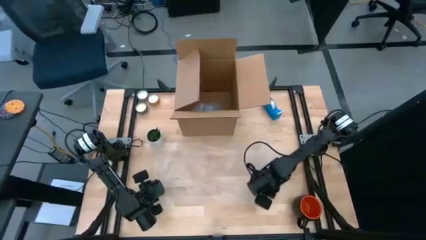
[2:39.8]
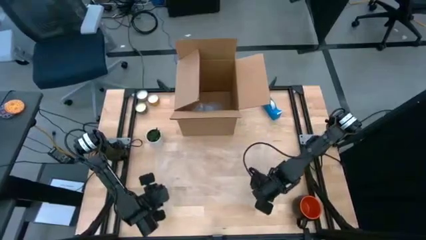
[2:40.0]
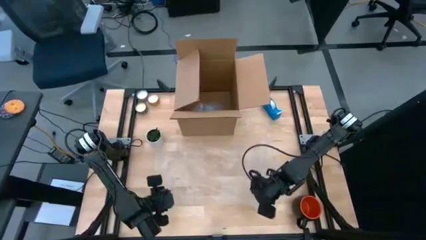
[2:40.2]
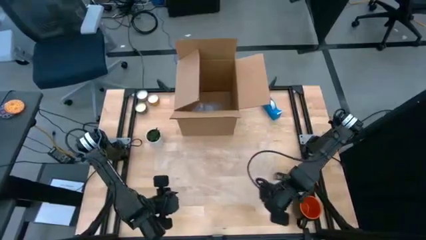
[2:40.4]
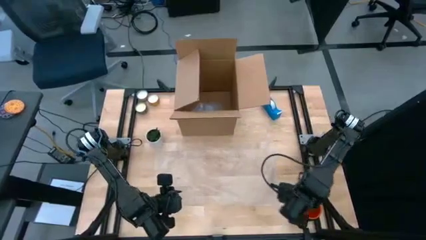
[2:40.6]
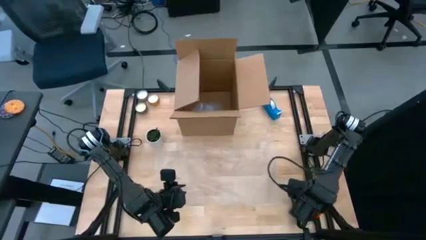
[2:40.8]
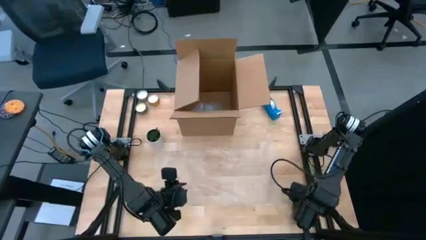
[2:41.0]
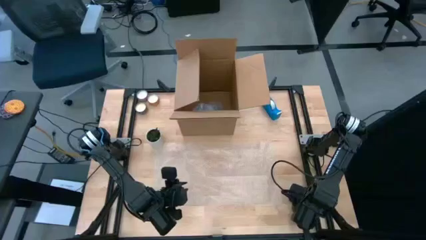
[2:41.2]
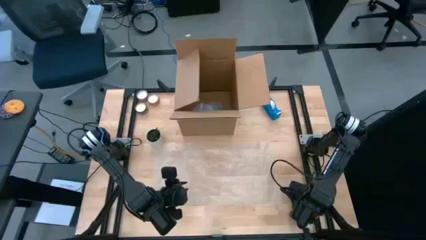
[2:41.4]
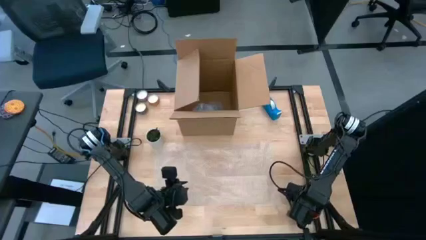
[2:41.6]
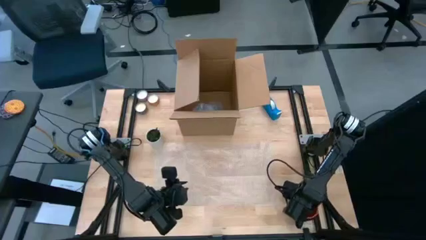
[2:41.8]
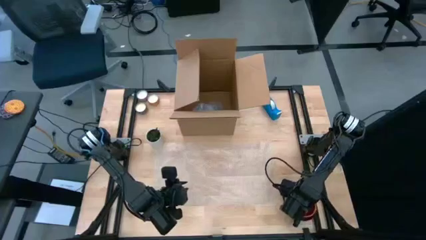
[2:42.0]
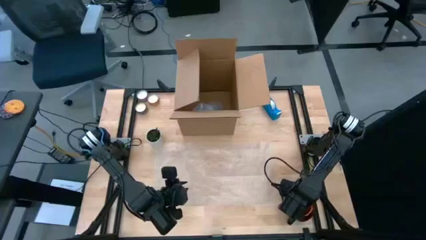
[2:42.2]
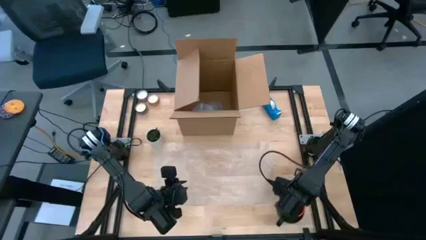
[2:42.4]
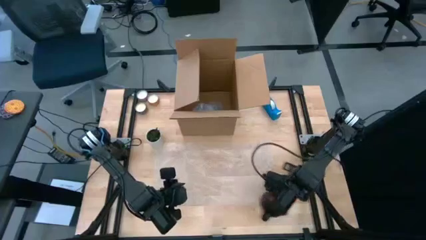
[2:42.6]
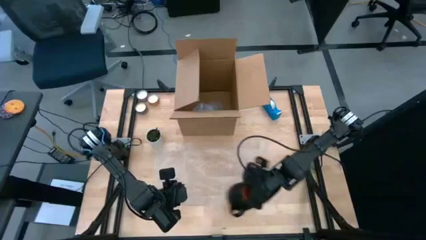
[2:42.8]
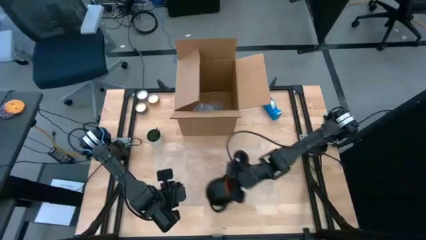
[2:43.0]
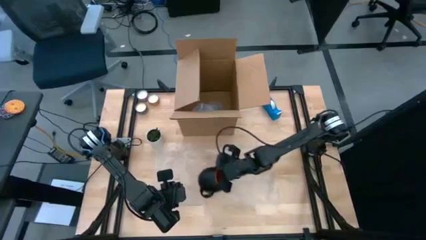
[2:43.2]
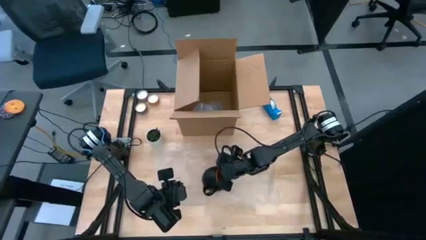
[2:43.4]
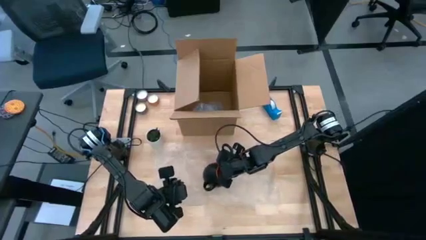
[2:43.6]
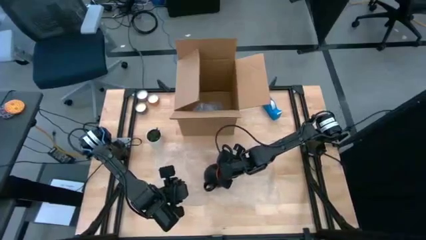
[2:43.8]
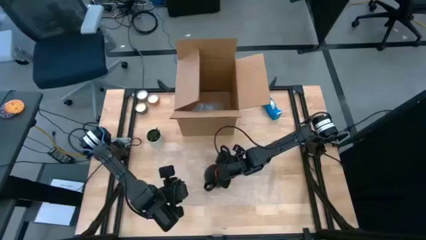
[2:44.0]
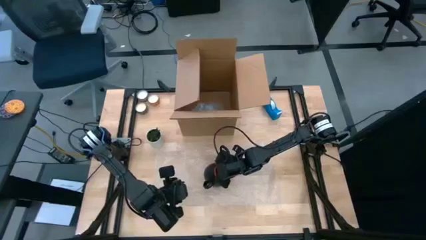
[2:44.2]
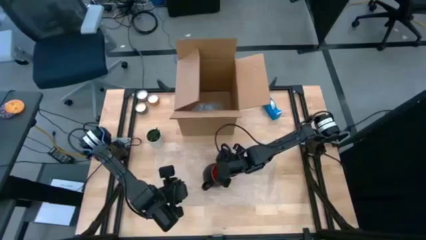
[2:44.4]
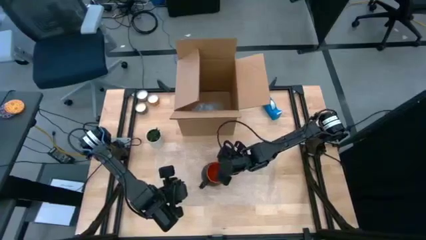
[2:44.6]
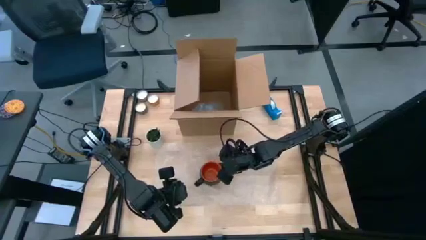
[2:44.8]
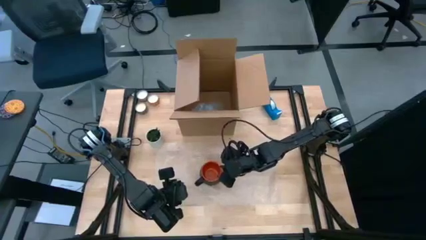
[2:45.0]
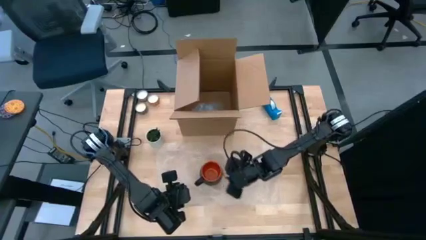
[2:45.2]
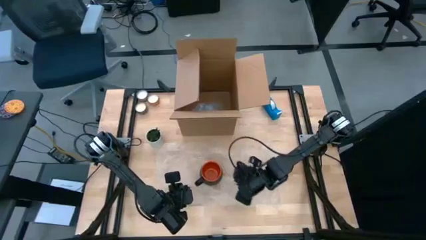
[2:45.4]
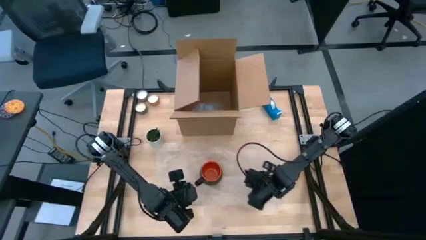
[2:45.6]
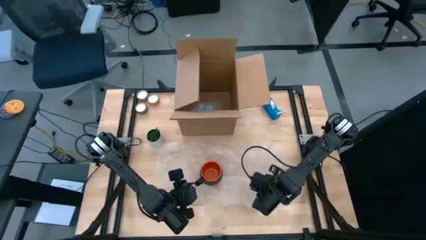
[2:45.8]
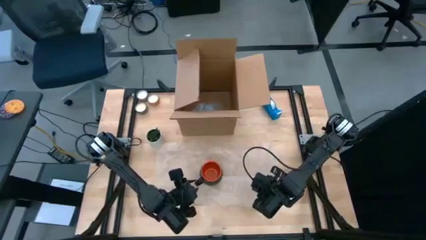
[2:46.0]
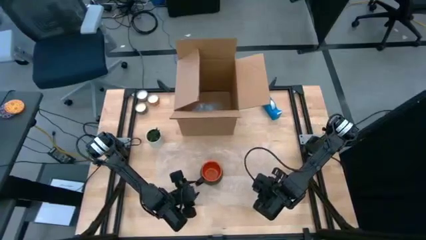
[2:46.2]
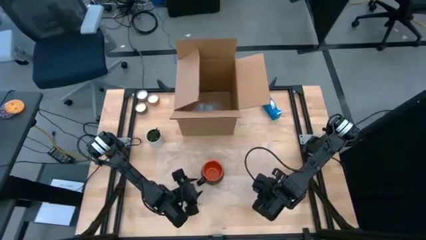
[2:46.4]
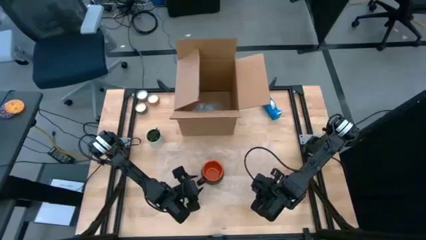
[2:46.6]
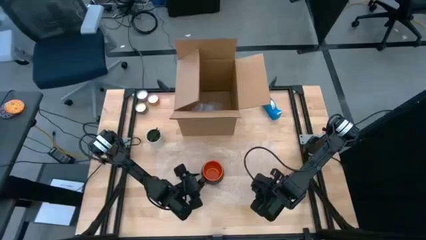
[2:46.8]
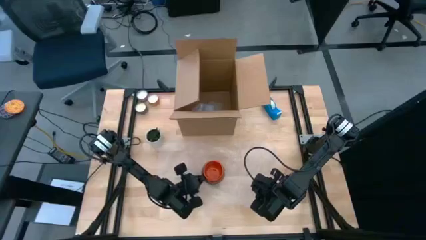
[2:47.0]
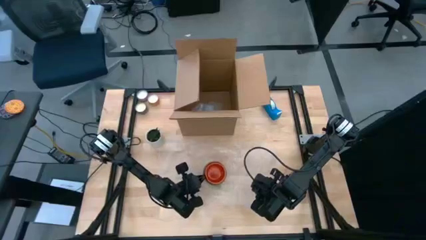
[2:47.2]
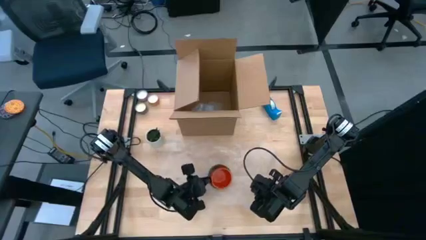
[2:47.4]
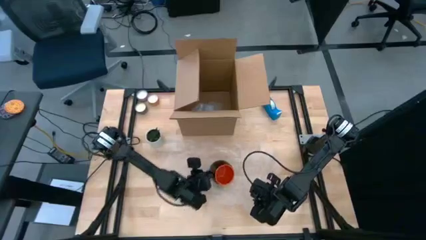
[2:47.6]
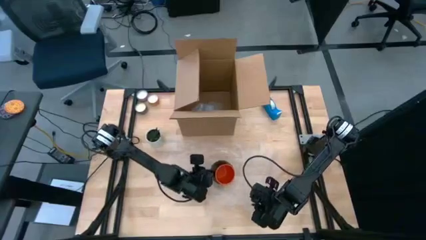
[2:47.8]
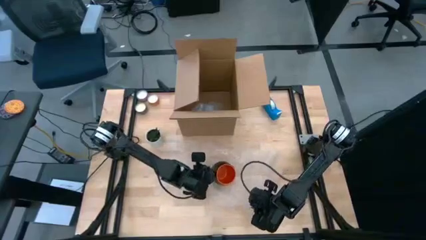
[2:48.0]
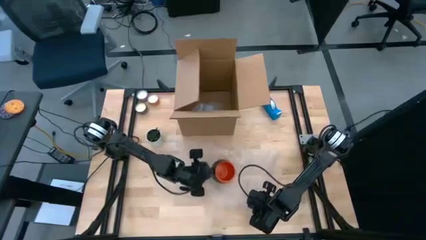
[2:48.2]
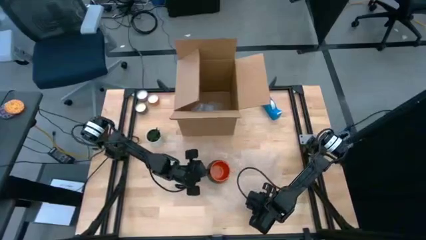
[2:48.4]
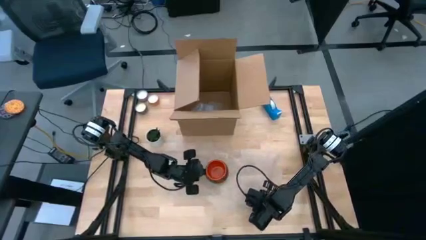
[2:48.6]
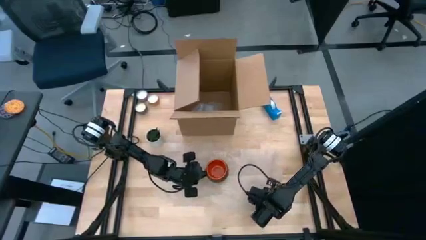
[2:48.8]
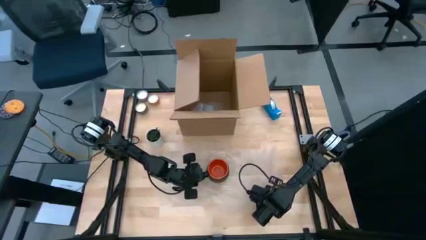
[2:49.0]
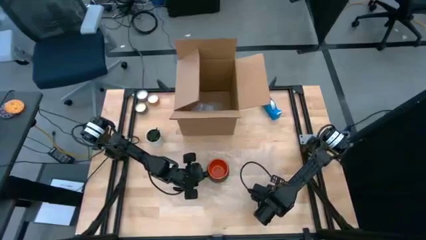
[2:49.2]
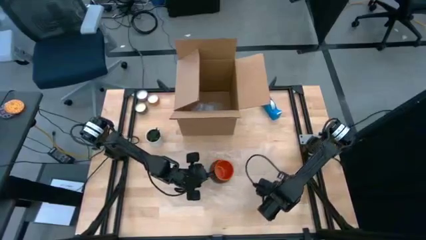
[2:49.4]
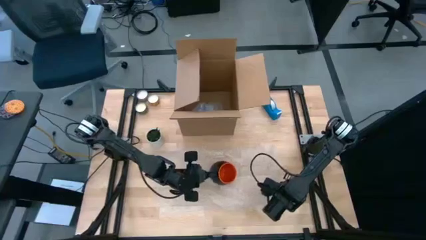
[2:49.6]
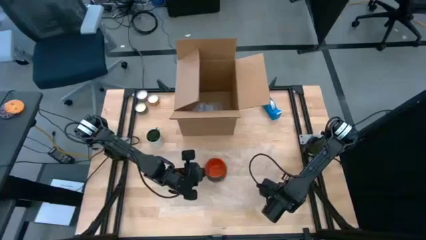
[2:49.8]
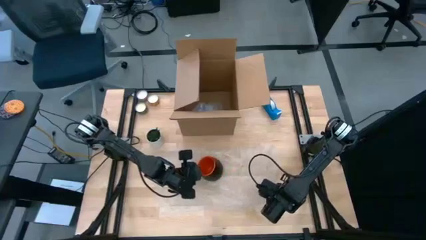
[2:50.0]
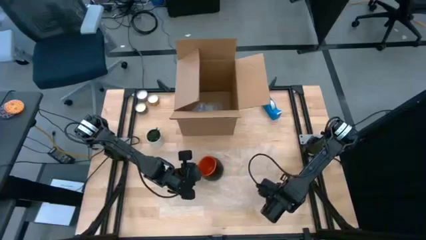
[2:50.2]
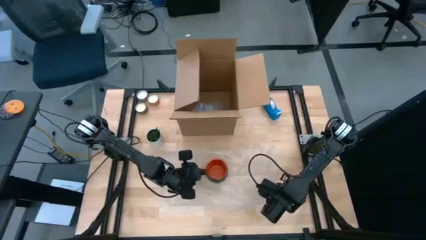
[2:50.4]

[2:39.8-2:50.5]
Task: wrap mug
Put the black cup on the transparent bubble wrap

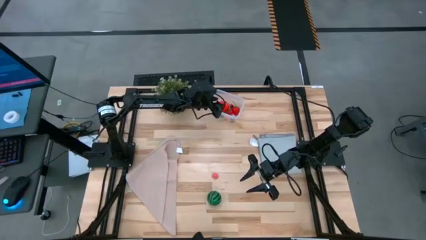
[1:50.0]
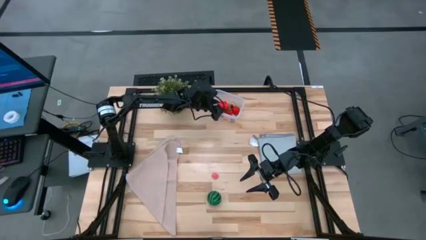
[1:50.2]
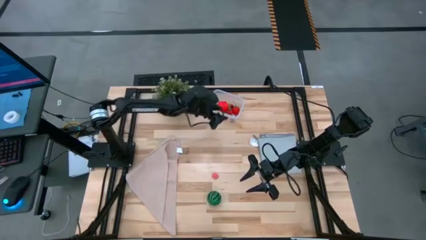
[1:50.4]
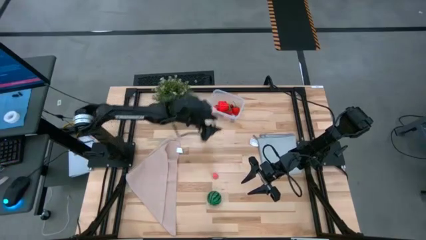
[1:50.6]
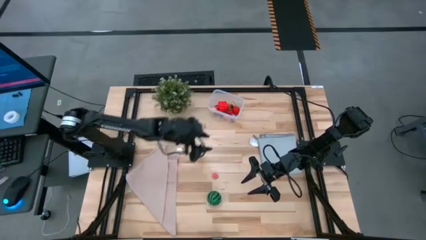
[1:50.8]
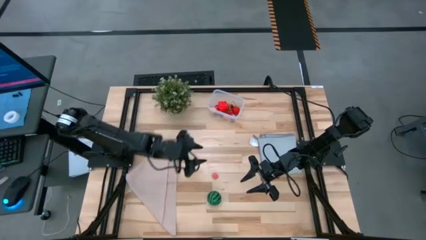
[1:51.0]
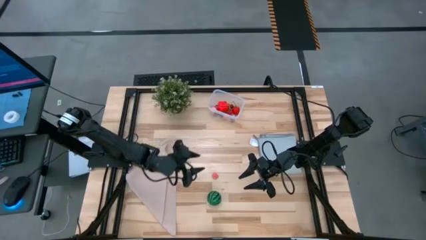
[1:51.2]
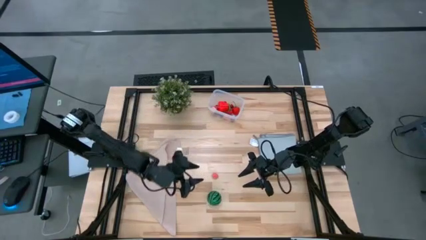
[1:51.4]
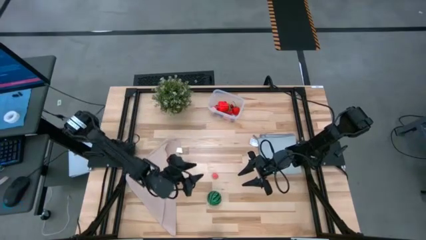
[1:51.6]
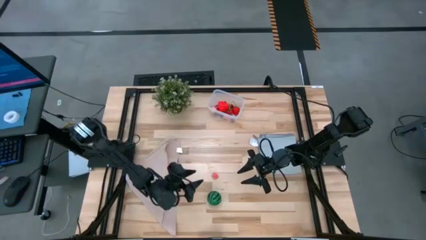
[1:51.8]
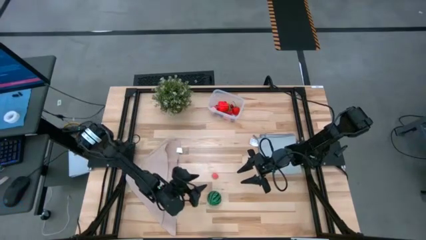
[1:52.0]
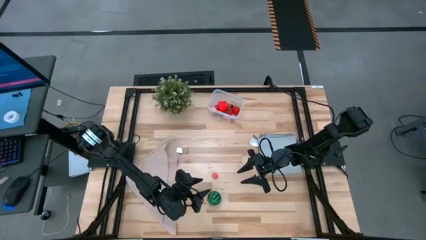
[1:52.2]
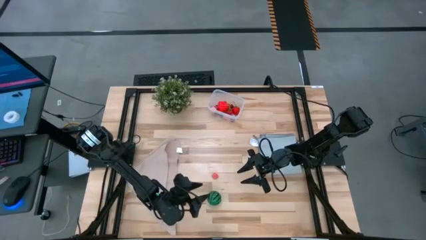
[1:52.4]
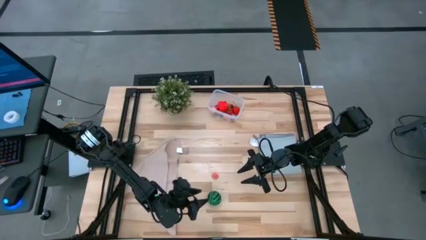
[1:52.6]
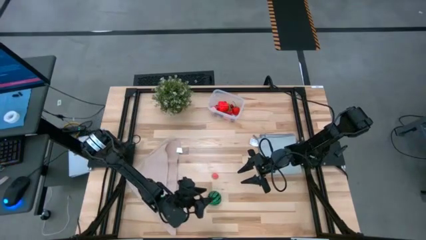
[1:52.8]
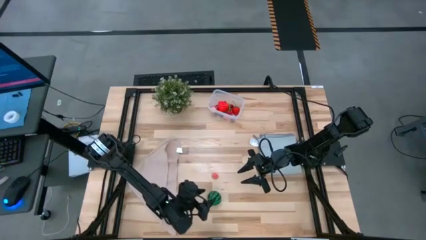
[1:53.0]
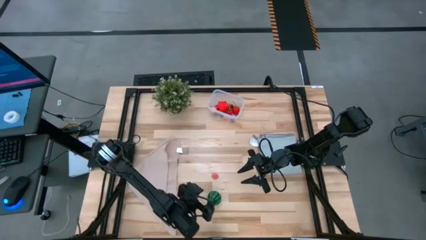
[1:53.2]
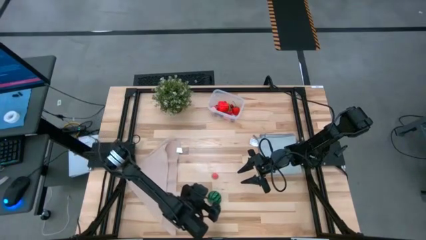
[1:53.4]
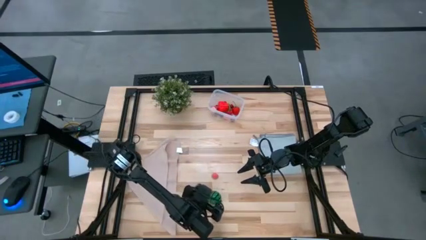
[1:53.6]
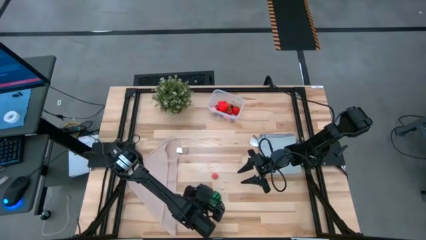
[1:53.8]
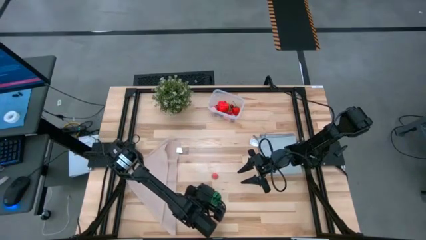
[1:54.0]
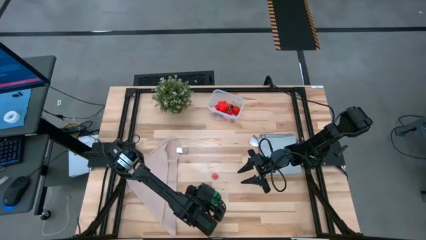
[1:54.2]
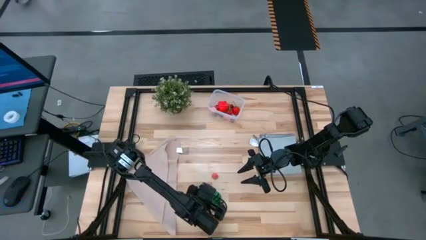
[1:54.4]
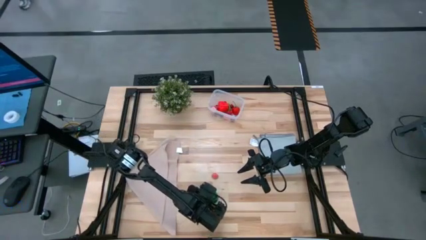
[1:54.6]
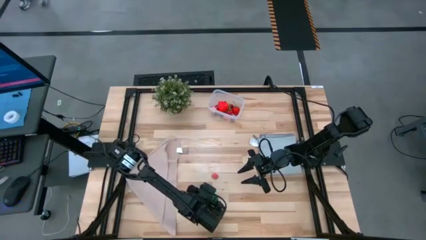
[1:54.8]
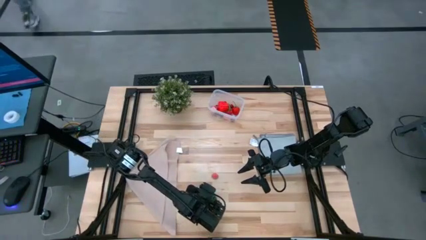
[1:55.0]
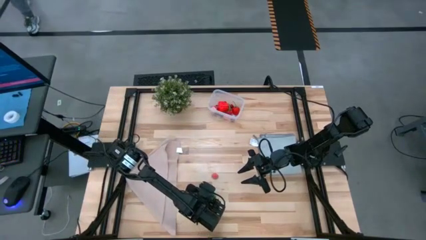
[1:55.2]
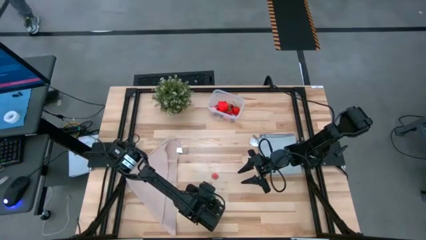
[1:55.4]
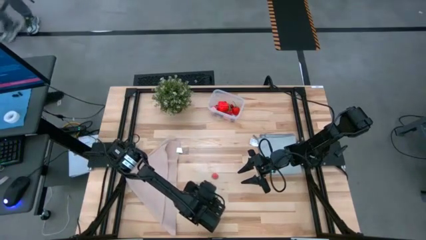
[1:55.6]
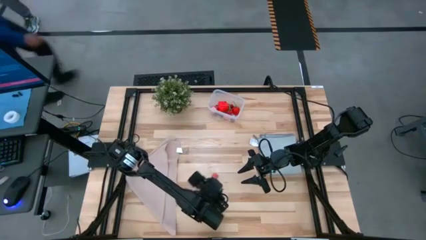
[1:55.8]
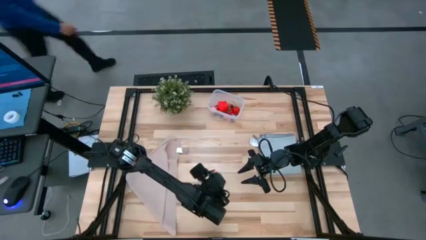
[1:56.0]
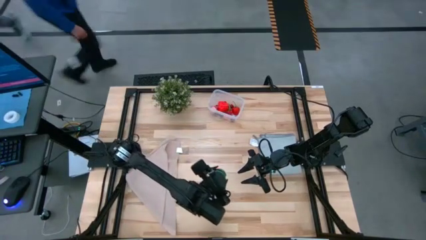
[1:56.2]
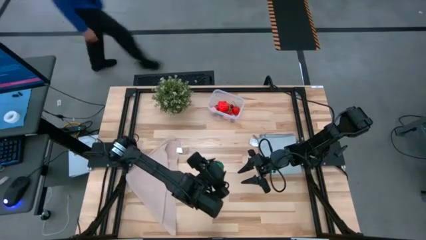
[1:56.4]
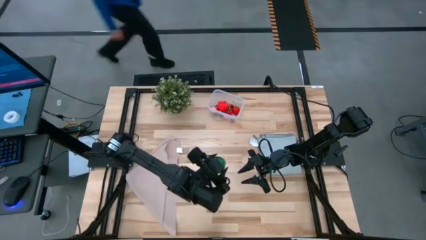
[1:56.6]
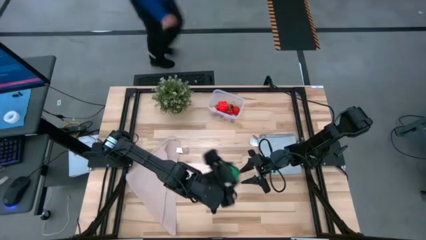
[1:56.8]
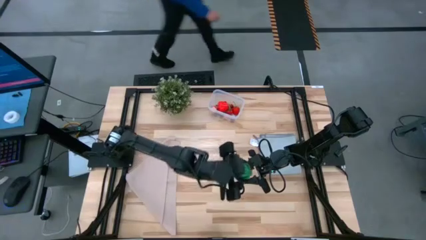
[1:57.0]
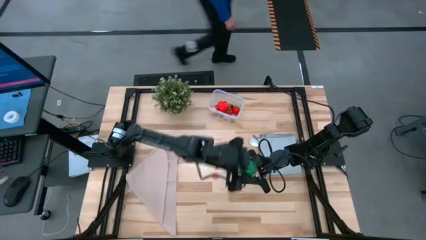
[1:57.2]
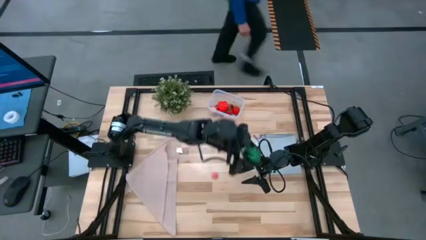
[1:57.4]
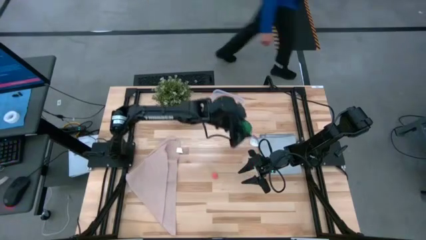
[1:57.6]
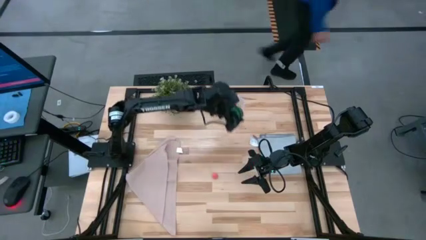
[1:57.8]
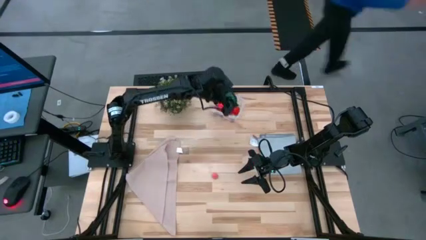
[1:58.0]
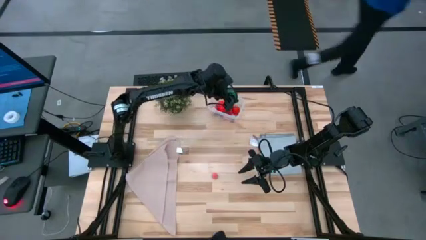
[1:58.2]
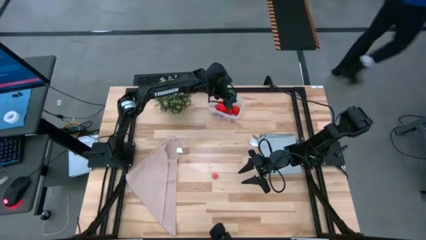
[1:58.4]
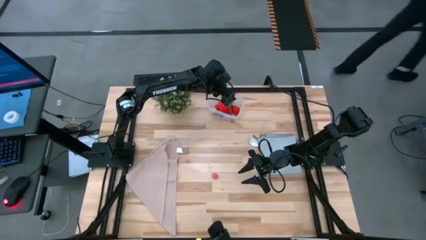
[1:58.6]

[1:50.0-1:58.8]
Task: Pick and placing Produce into tupperware
Put the watermelon into the transparent bin
